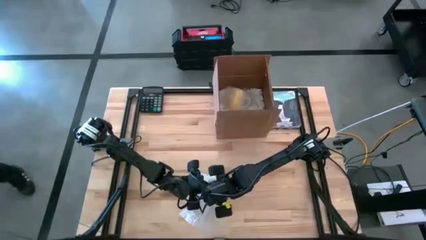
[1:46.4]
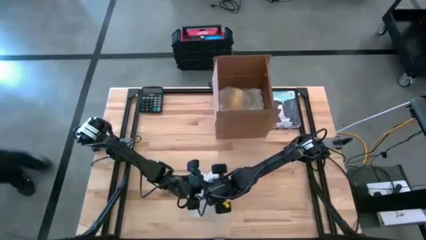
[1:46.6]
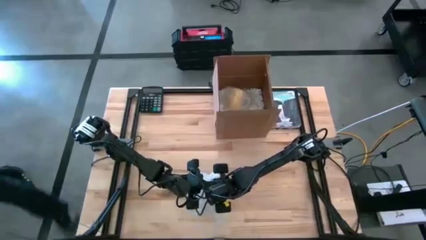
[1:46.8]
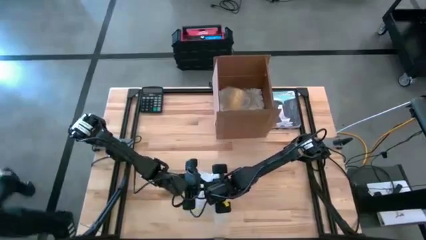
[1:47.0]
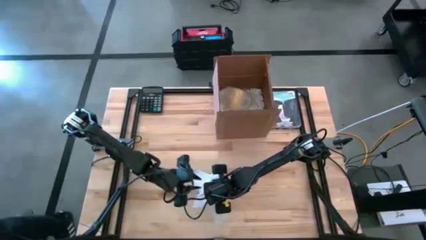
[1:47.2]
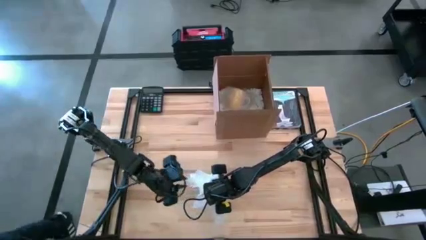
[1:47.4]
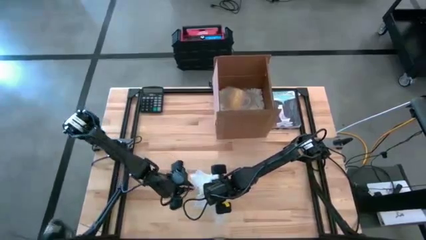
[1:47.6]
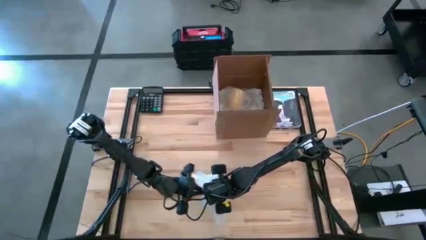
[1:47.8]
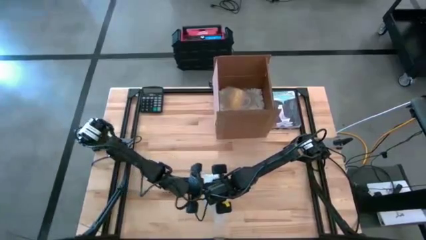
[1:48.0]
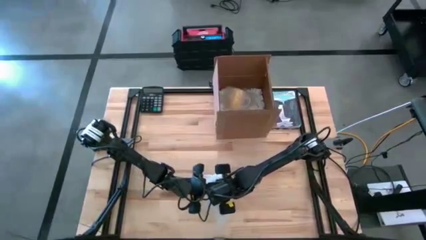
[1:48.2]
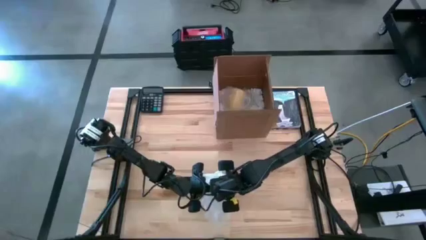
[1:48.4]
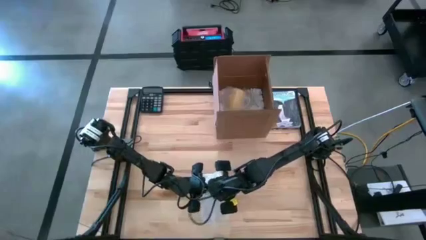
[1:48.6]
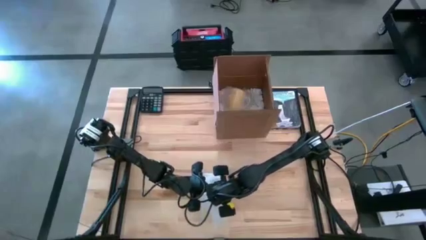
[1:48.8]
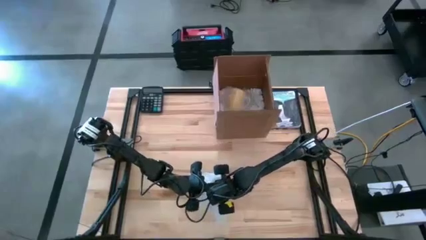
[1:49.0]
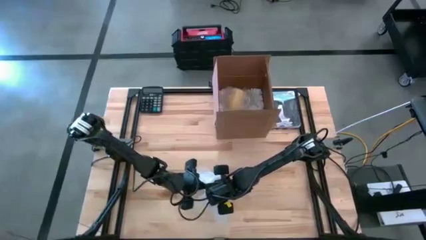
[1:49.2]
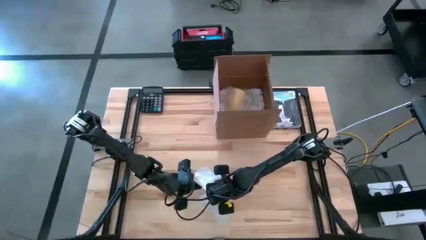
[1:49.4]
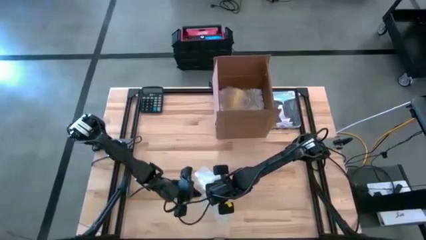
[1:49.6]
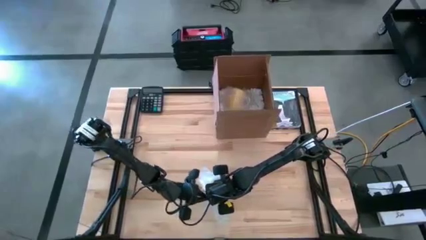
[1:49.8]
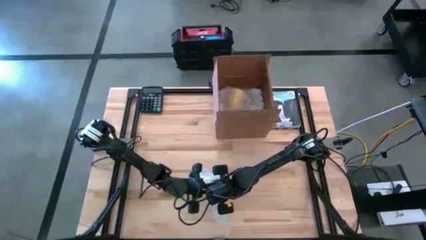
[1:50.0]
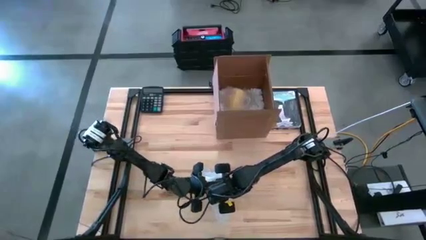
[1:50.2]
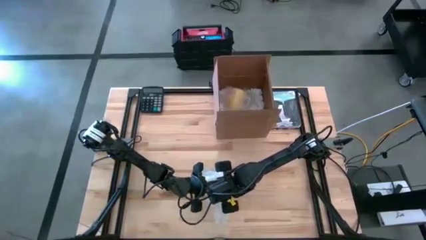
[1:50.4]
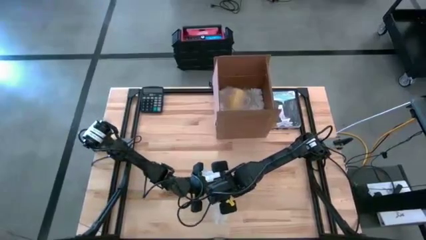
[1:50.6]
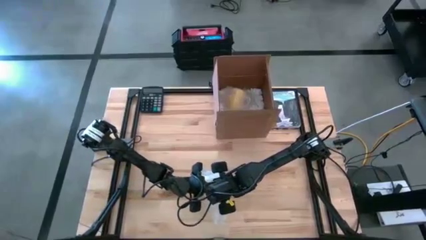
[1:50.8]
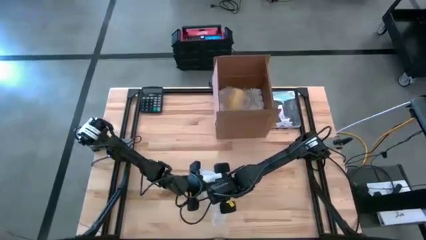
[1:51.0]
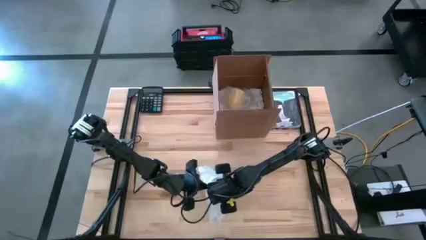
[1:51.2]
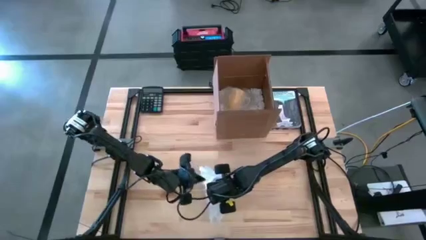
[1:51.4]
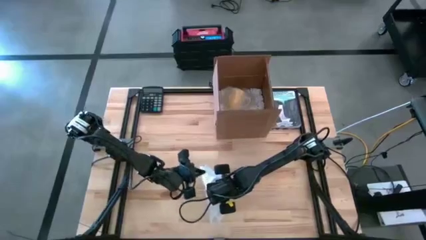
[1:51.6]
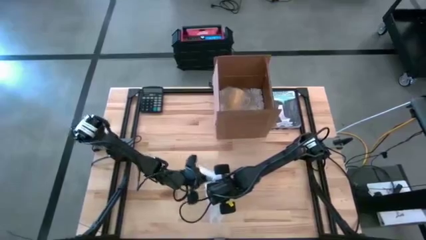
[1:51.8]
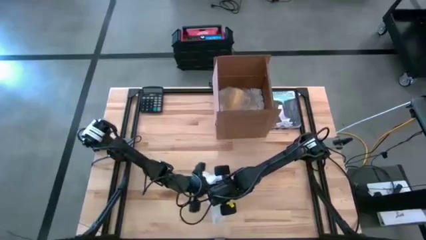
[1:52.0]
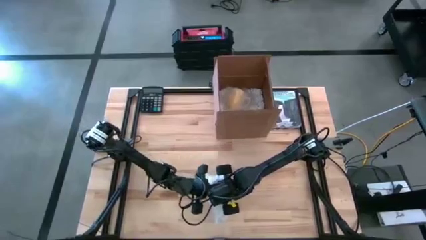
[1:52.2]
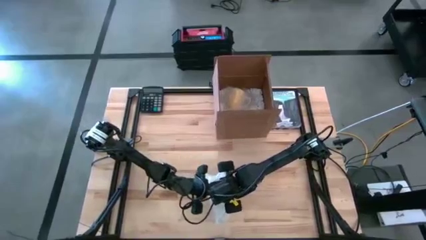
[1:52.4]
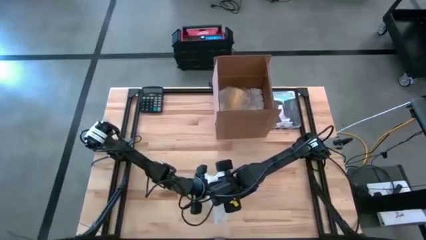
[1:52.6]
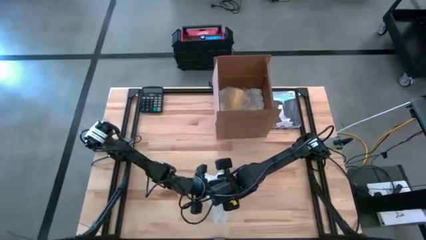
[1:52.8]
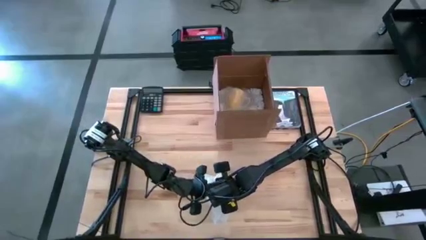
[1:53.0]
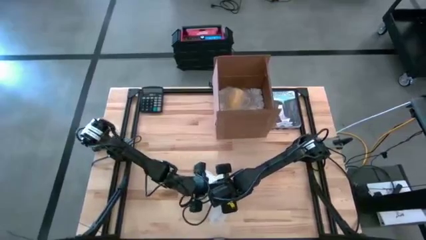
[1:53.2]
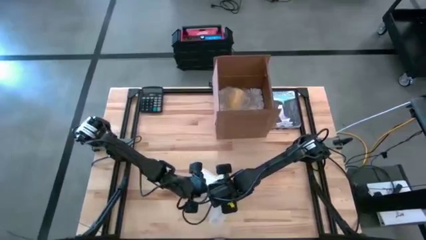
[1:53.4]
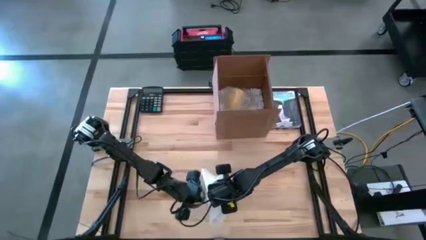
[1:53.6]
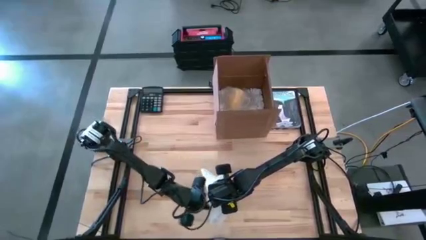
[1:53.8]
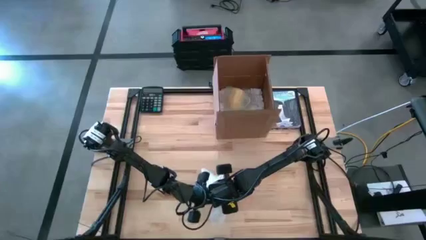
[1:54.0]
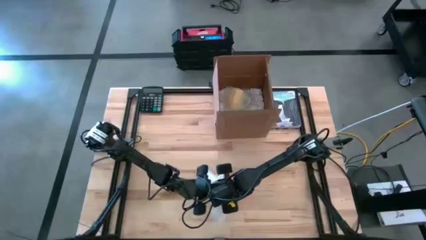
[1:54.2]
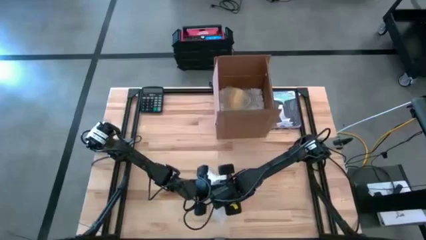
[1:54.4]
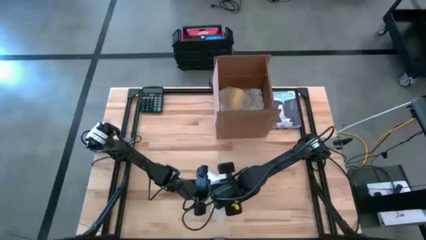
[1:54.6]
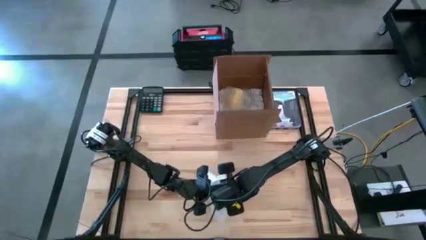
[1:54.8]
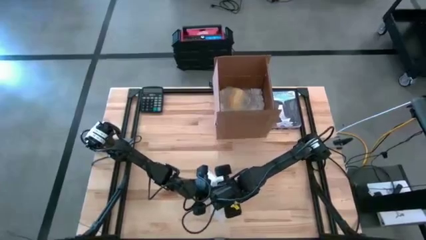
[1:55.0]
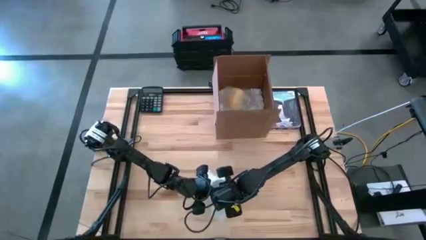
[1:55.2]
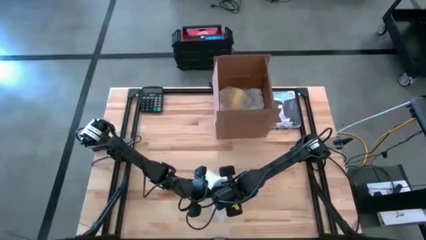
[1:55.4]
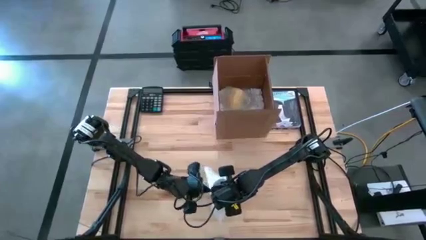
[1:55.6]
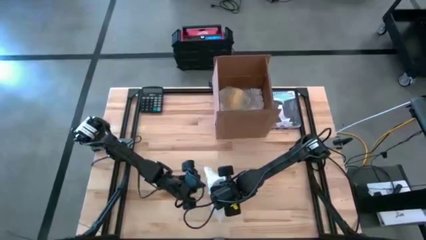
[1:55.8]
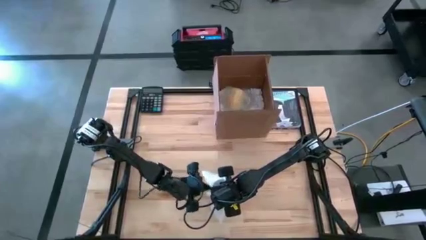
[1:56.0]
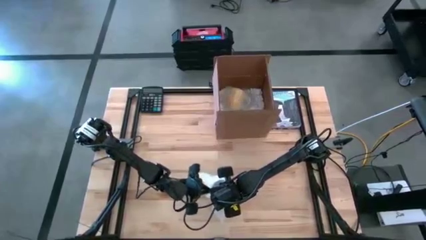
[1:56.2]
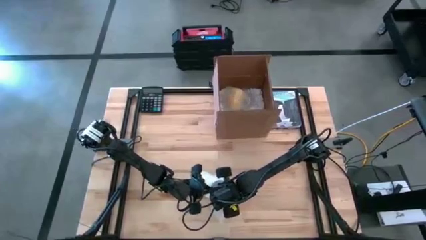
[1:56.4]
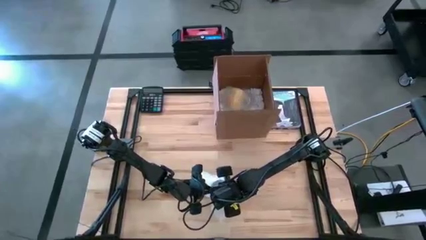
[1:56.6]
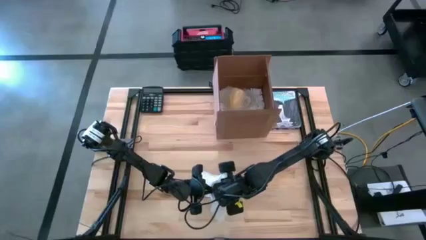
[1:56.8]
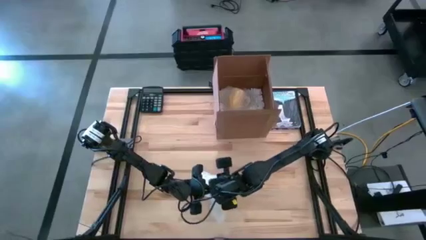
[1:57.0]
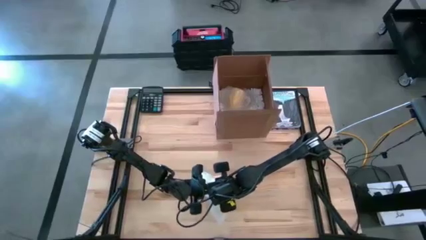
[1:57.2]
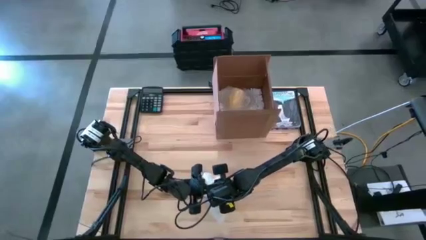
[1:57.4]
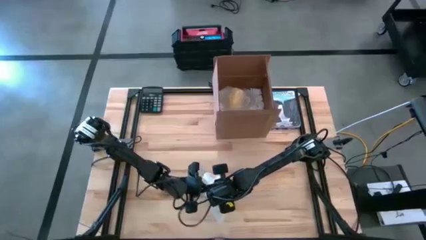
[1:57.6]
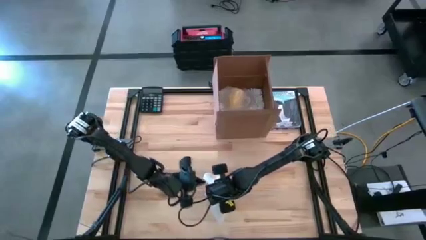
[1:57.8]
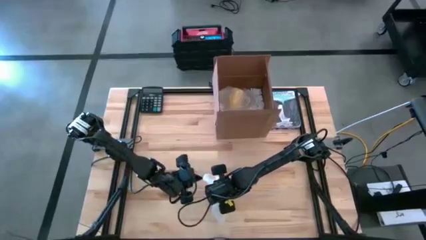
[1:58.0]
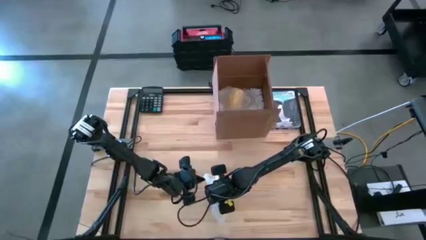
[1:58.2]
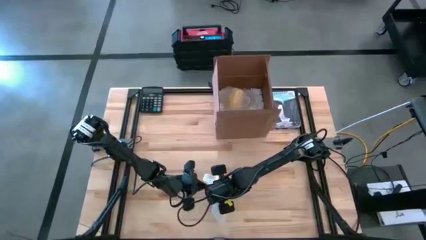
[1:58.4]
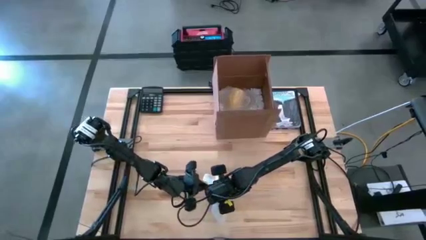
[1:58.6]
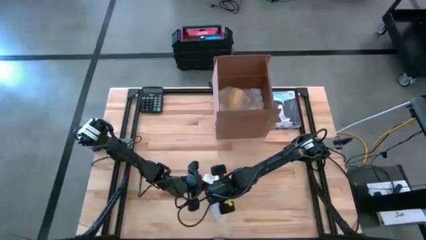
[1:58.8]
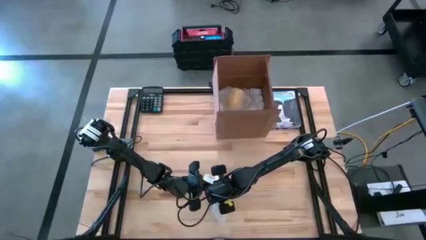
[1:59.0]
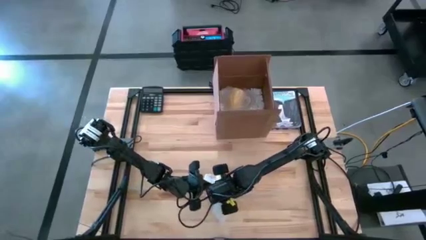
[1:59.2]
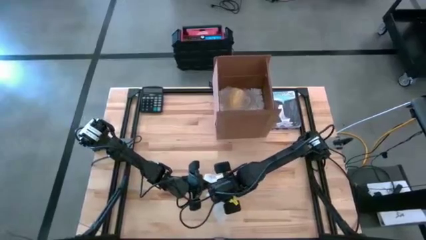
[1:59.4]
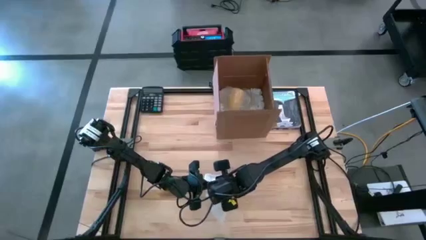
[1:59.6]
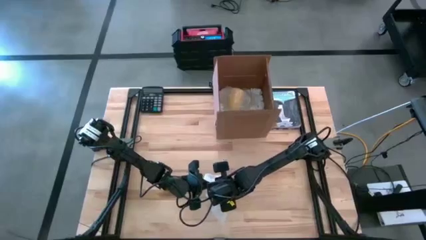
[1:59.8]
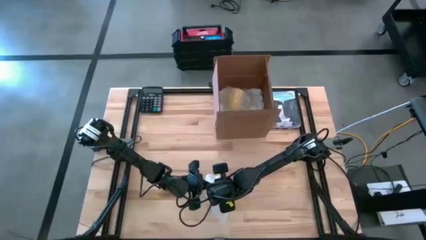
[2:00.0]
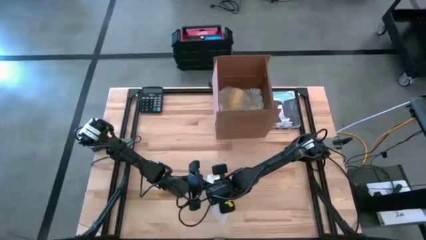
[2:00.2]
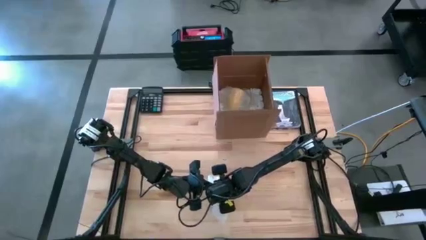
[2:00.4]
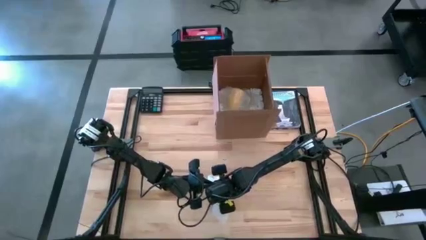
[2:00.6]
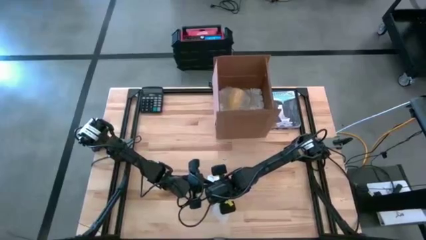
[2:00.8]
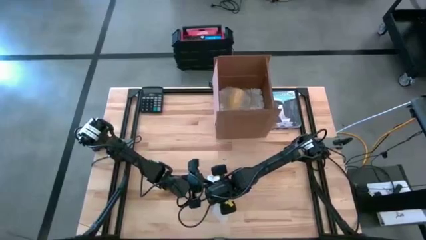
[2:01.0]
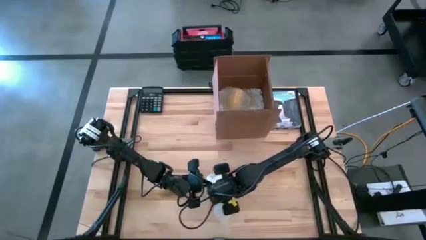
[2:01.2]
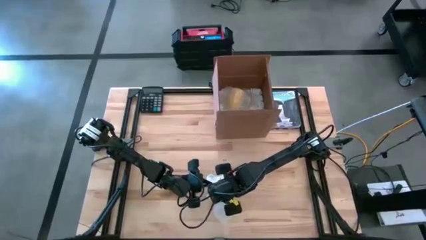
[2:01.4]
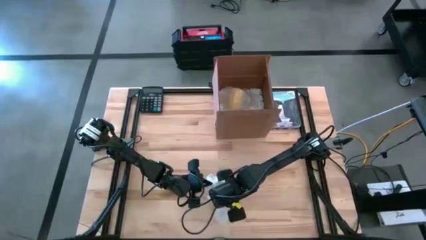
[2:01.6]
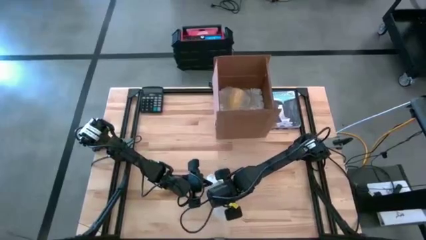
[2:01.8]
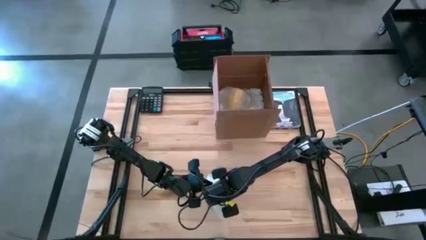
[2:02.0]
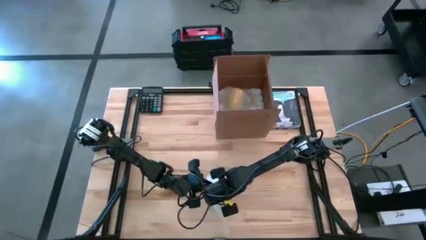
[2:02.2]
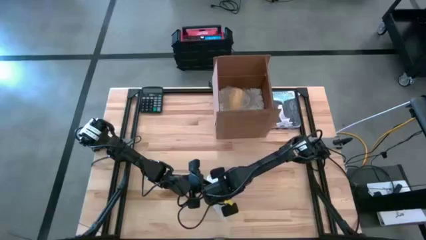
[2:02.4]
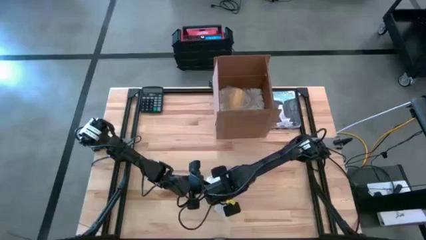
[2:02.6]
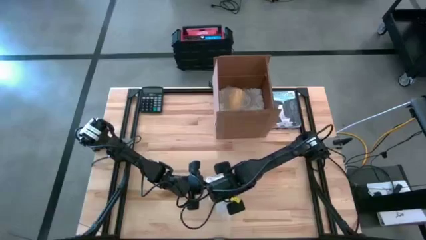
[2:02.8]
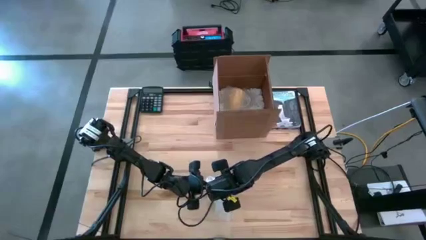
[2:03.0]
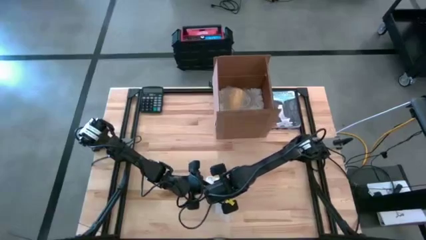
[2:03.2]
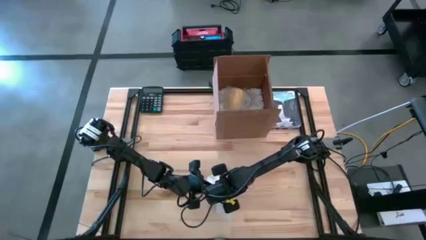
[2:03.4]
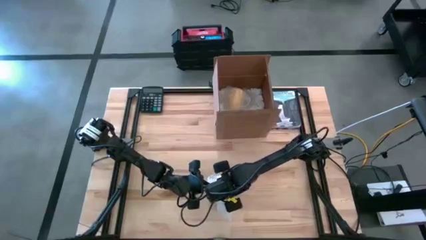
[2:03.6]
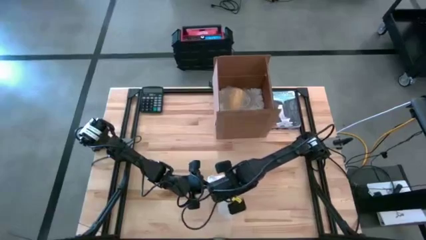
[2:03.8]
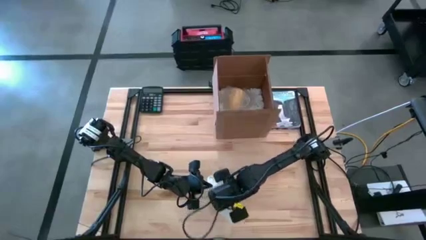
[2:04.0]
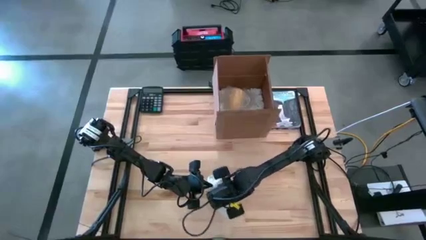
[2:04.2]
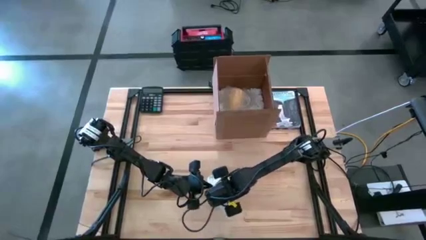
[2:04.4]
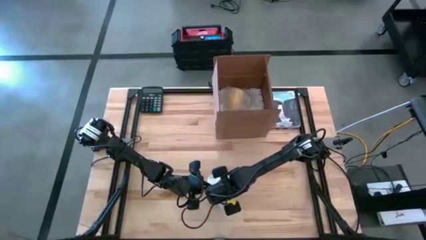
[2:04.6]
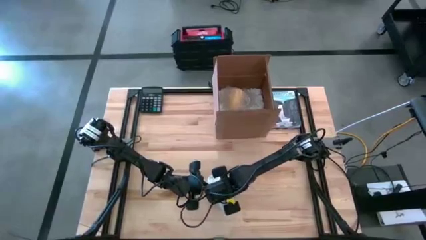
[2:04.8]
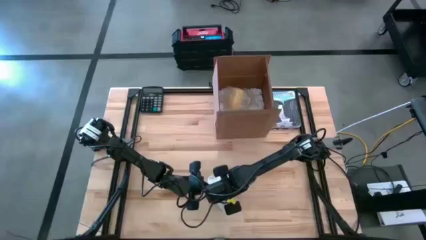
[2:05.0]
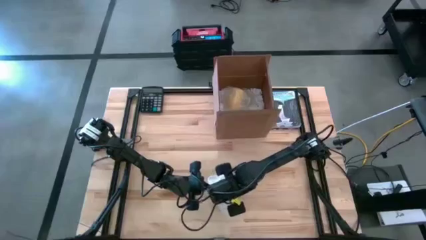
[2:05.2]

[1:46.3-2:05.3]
Task: wrap mug
Wrap the blue patterned mug with the transparent bubble wrap
